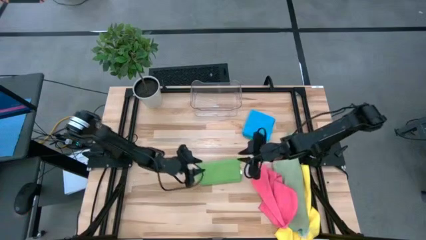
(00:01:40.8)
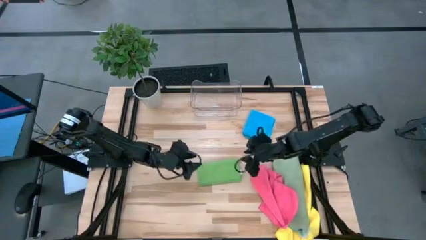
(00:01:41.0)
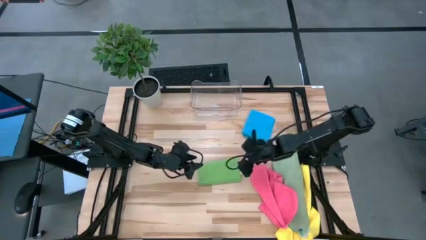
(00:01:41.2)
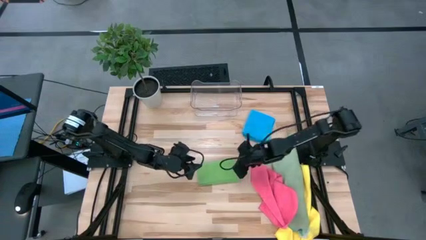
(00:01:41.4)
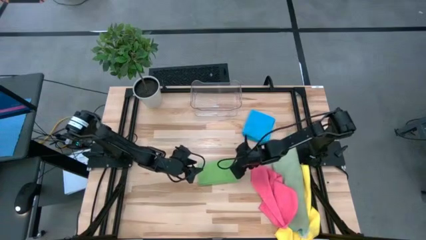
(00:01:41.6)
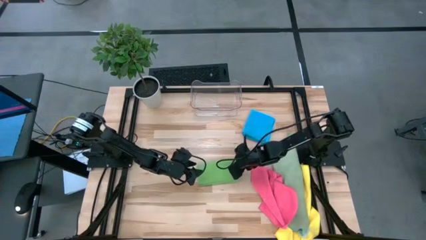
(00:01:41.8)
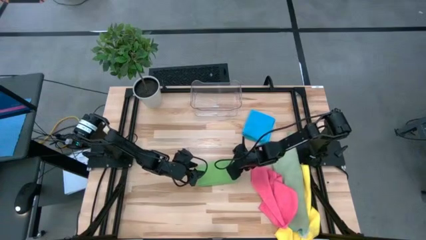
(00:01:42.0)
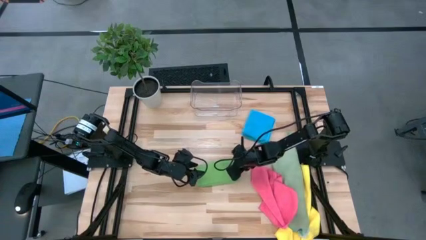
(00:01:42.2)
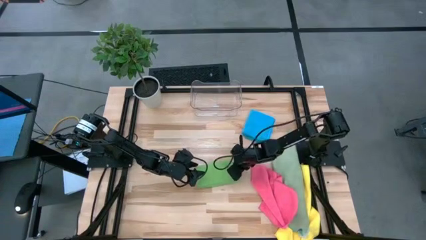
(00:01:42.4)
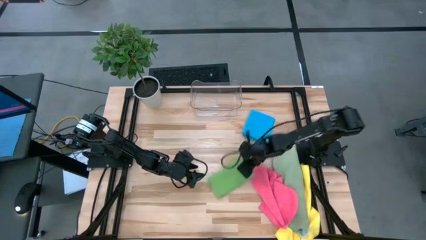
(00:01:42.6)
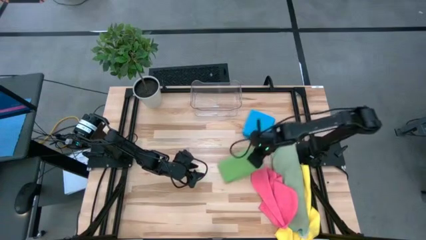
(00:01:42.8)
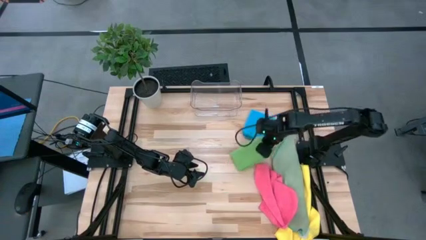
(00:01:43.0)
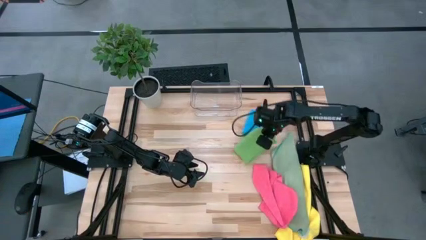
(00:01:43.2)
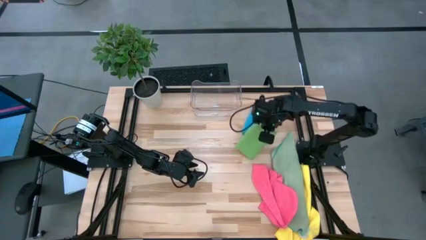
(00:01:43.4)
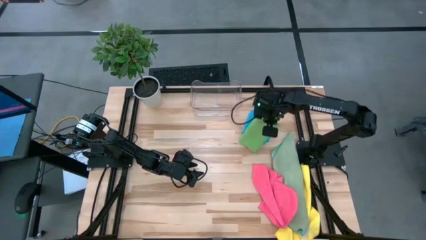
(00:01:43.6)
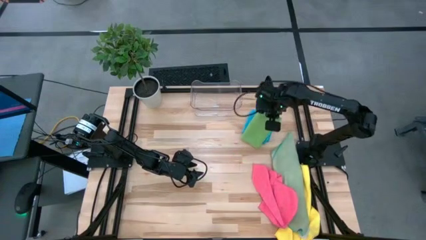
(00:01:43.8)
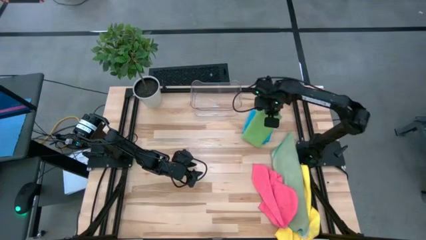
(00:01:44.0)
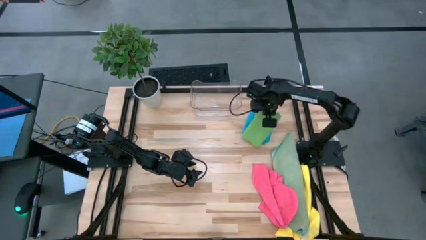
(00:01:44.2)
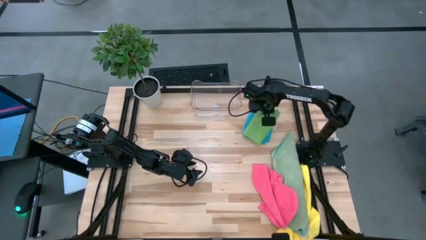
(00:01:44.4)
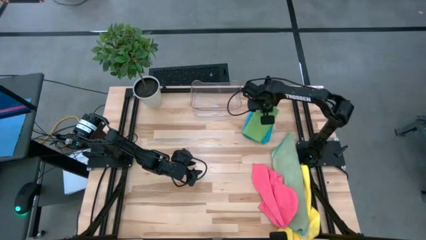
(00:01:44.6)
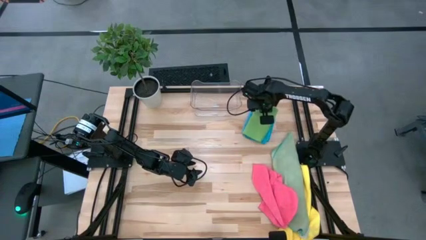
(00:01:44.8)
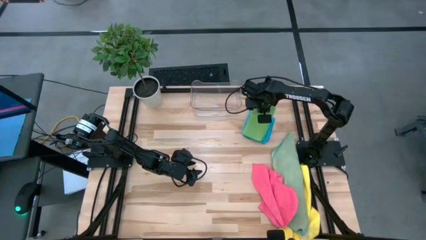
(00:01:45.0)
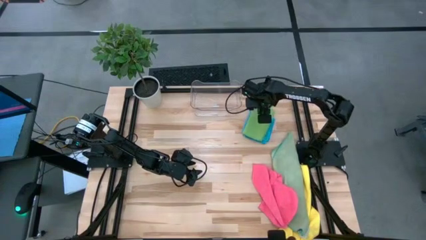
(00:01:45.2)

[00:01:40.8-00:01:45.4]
Task: Fold microfiber towels
Stack the green microfiber towel on top of the blue microfiber towel

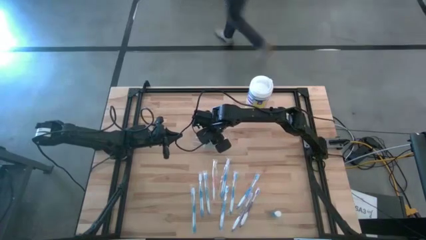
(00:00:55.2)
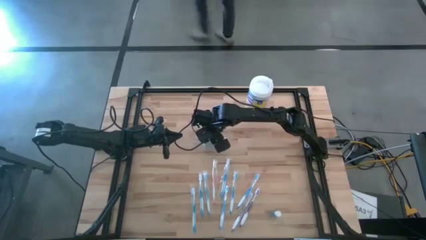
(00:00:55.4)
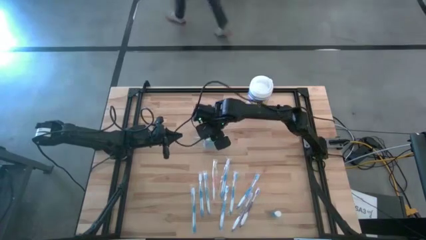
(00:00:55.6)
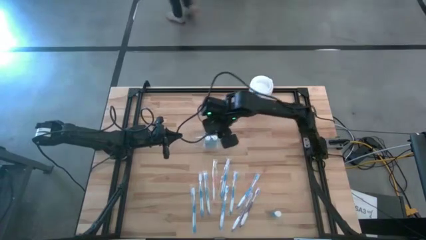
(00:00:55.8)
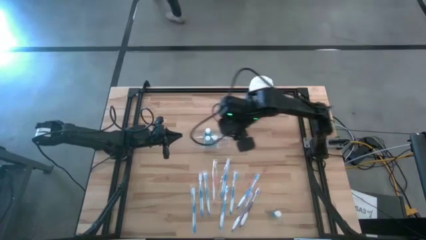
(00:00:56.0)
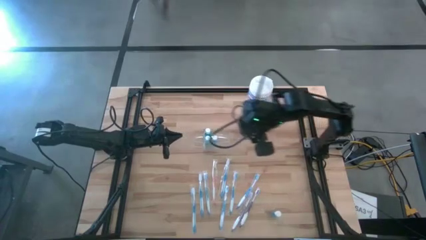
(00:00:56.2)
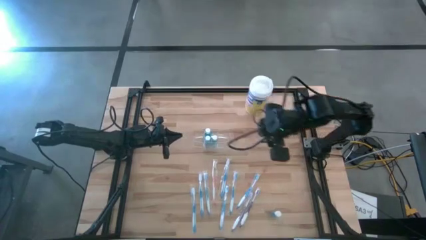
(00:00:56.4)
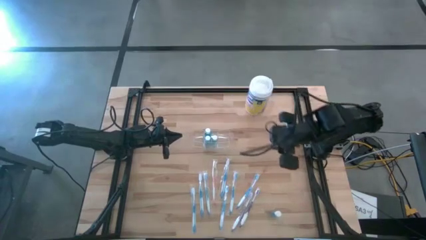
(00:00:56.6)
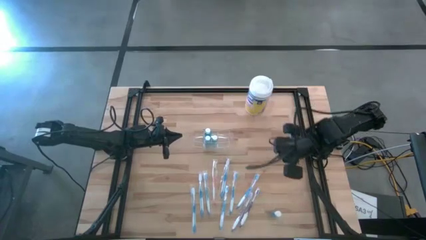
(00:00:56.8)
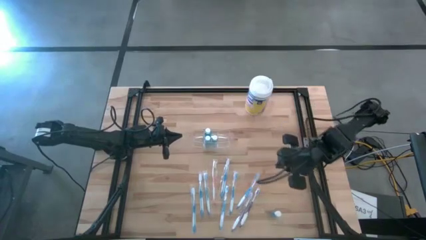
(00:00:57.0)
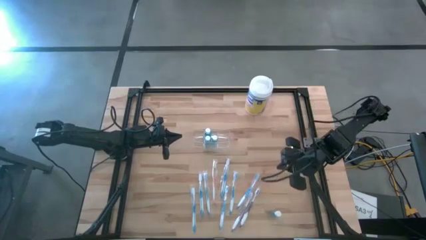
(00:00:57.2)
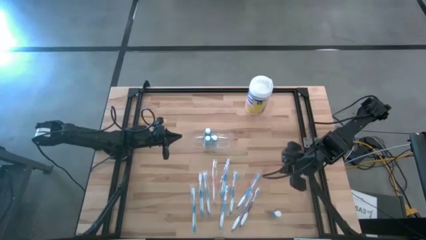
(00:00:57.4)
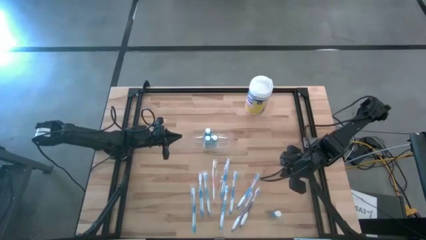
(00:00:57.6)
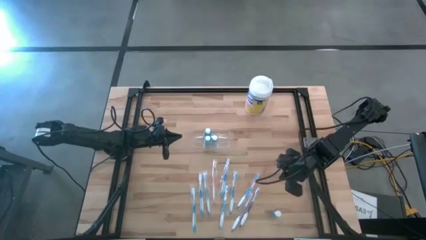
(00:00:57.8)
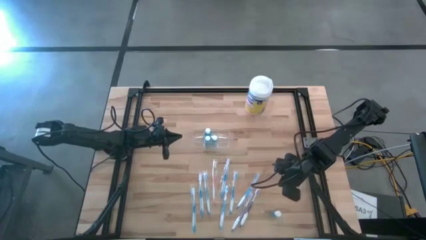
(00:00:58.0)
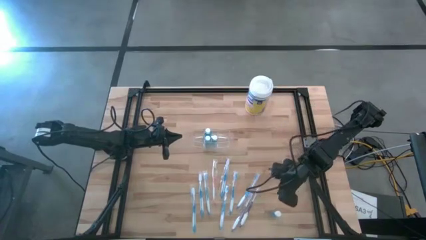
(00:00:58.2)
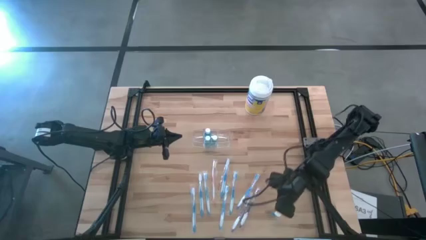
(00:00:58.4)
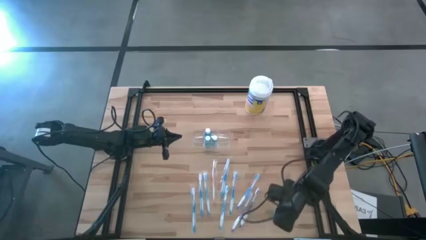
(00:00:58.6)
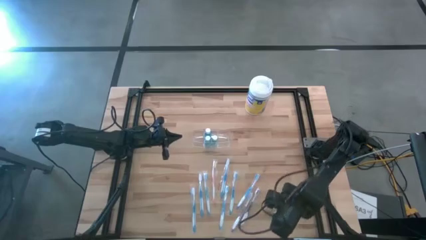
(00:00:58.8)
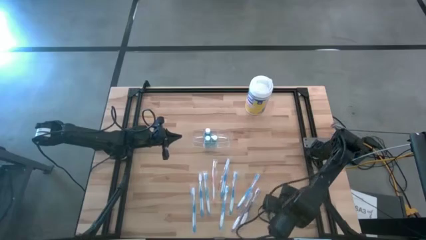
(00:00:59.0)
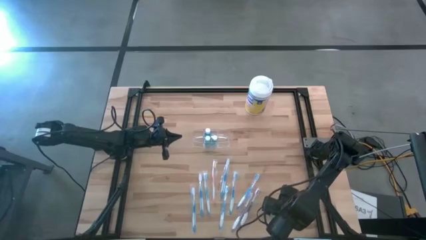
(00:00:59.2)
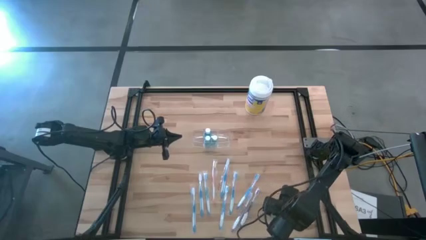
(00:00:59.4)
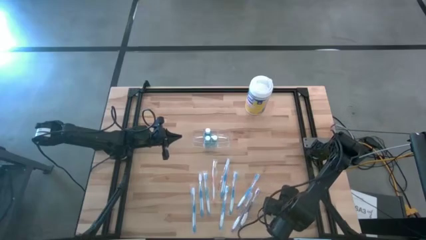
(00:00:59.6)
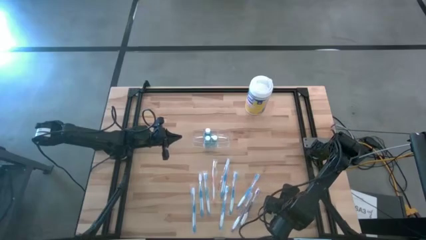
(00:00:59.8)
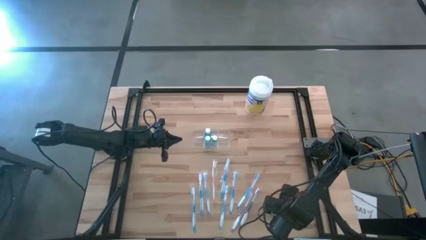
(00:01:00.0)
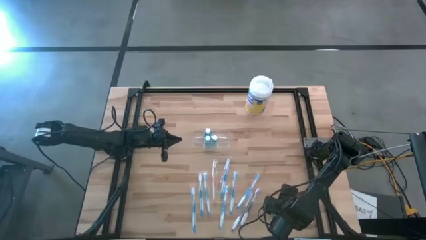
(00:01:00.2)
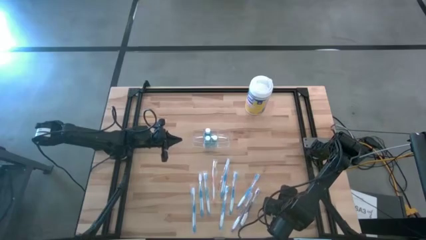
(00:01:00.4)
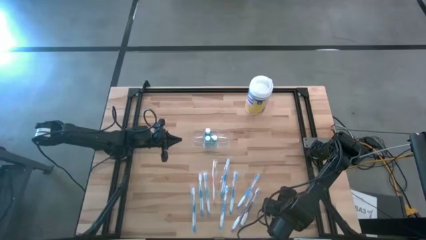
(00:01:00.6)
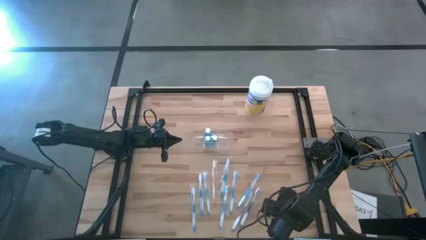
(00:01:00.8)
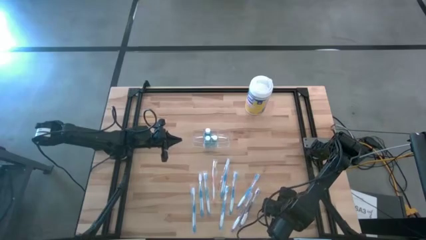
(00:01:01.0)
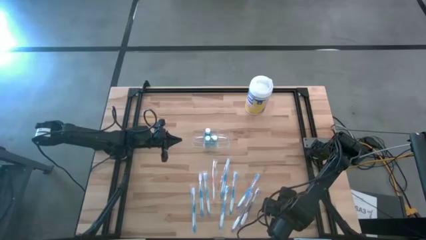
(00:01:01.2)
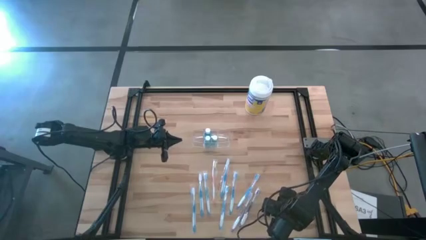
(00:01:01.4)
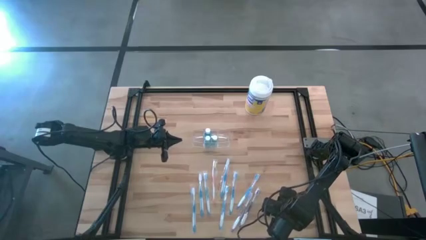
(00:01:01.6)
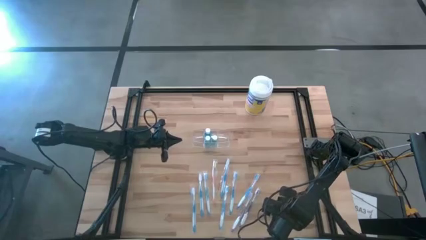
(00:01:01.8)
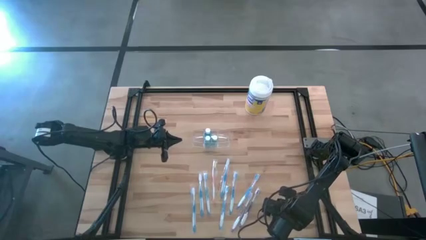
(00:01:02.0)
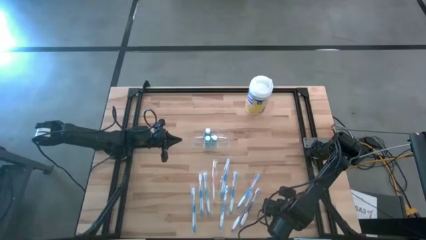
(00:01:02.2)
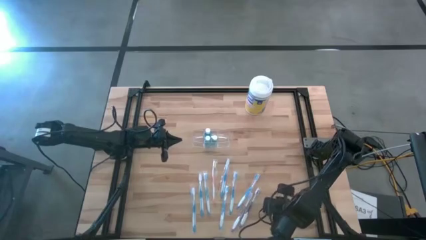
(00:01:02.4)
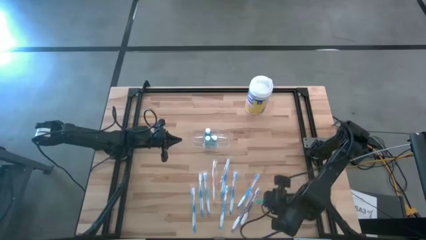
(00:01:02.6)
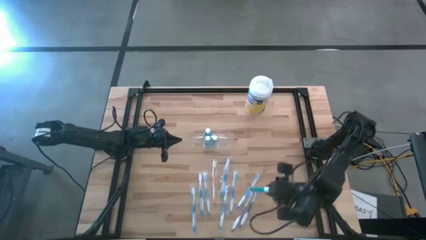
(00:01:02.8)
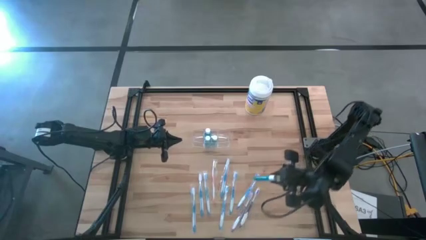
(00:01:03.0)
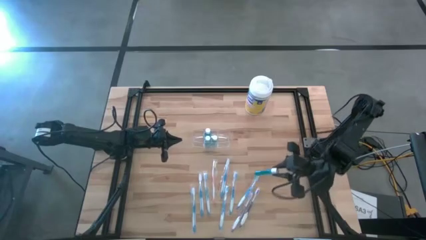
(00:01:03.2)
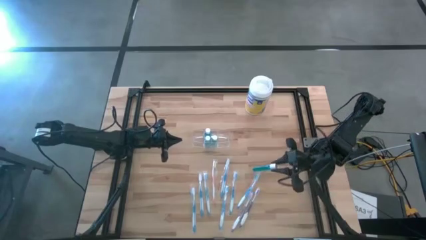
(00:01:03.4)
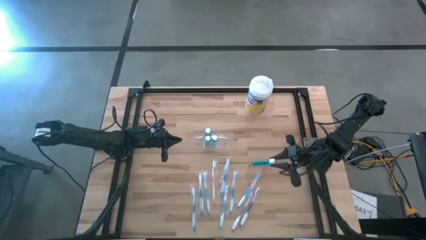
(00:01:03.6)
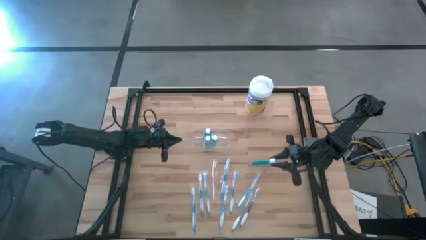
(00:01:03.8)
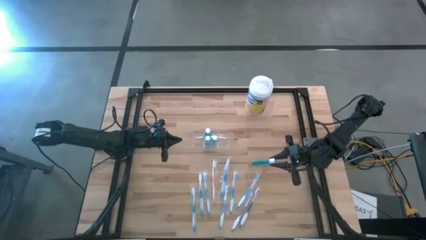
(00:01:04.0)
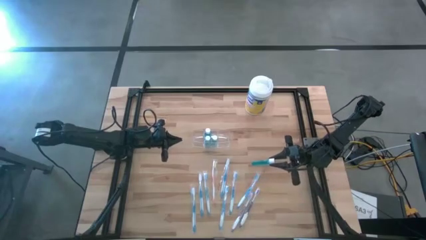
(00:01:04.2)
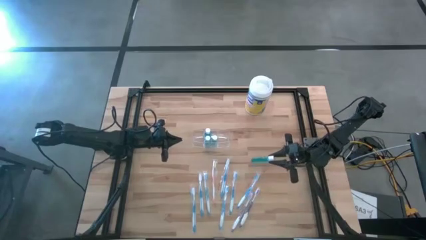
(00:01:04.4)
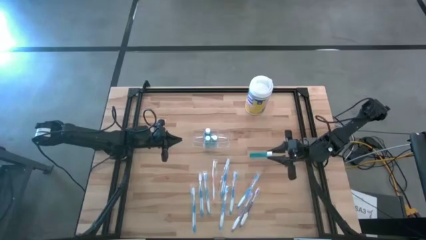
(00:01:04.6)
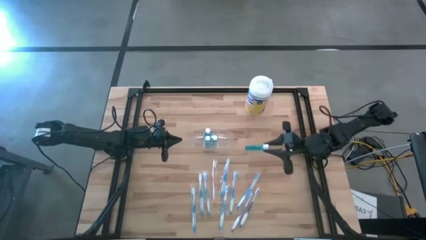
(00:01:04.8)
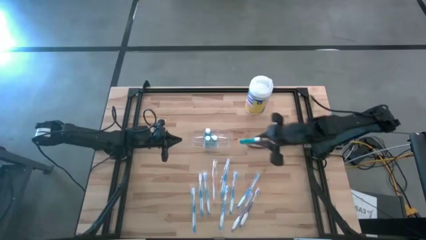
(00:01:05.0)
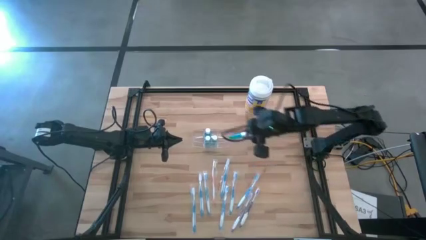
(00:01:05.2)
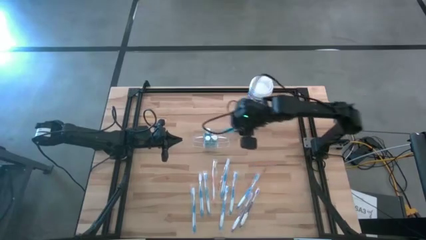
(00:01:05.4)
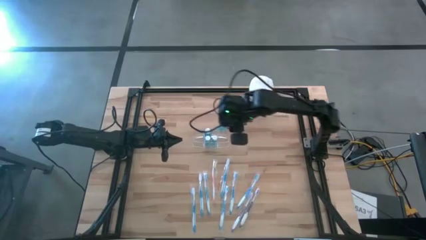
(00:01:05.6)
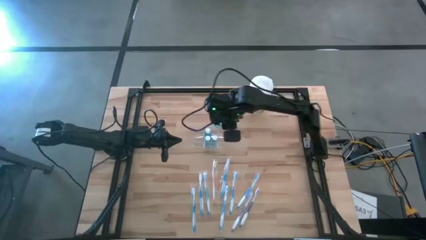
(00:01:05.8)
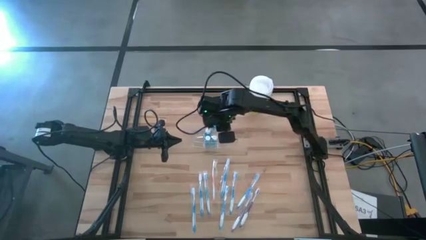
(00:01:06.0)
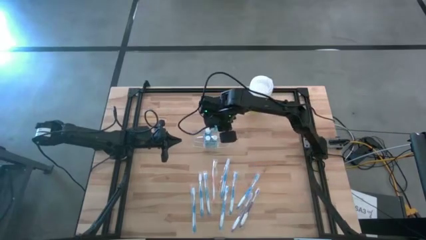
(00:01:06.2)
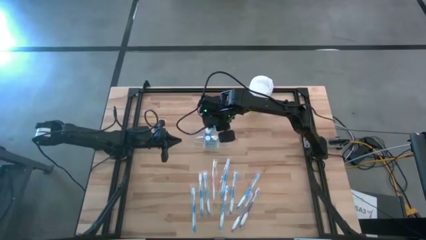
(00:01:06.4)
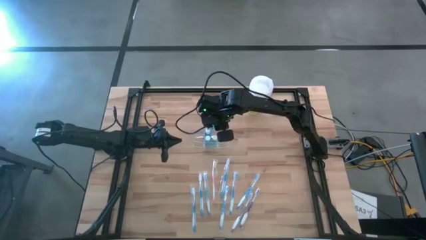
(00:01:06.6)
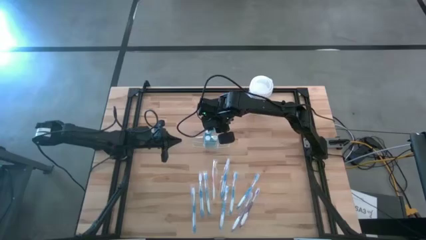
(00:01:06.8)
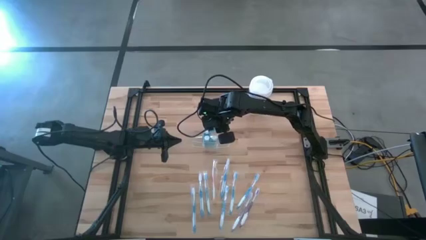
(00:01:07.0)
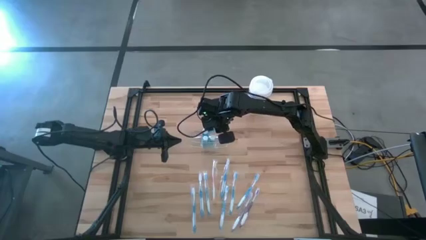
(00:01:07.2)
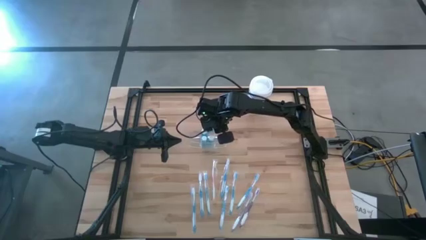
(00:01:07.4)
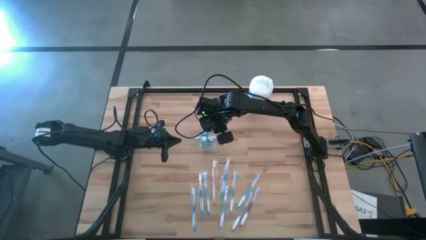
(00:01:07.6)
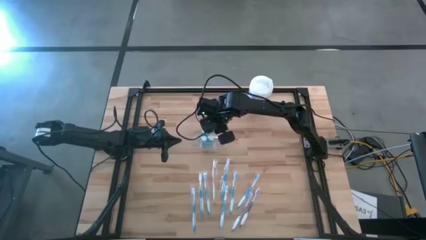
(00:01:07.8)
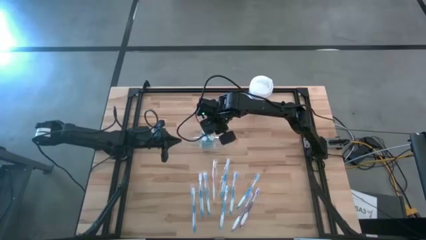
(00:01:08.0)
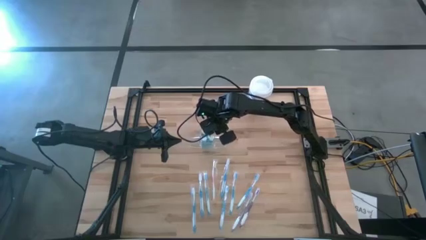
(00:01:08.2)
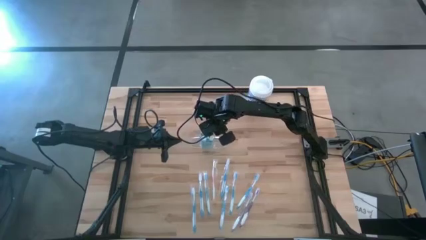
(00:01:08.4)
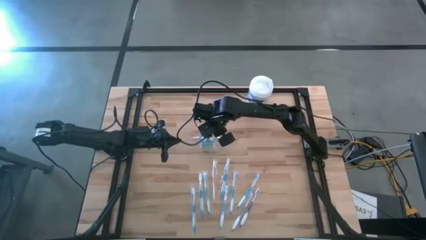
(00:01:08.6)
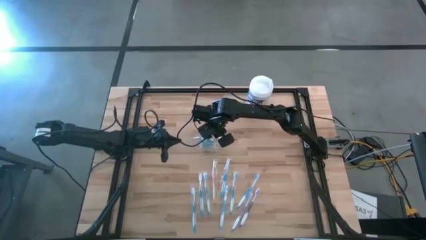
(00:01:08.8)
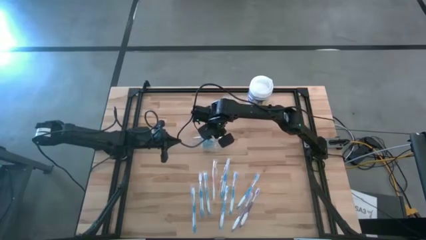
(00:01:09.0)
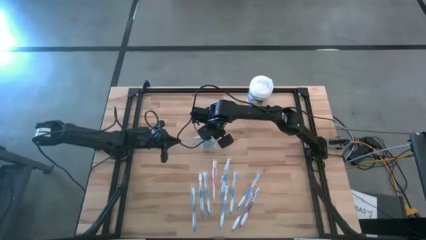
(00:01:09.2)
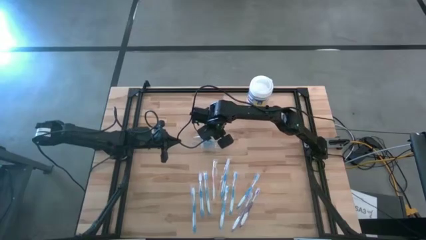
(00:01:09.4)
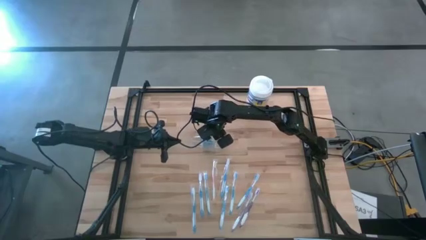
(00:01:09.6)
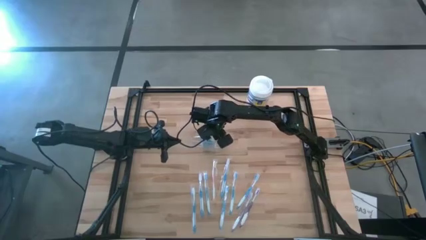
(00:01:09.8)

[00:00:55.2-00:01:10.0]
Task: Pick & Place toothbrushing station
Put the blue mouthwash into the transparent organizer
